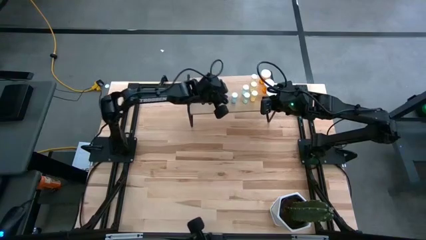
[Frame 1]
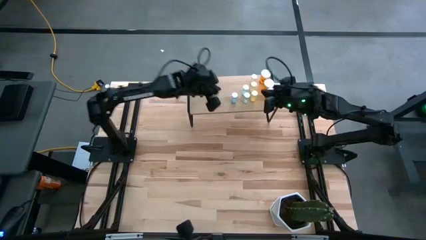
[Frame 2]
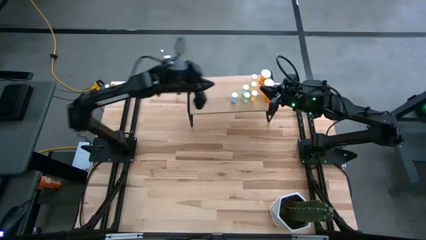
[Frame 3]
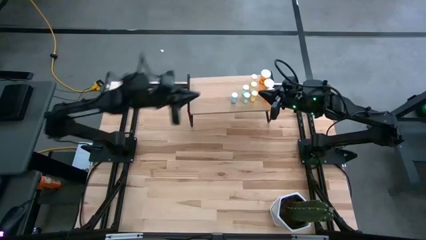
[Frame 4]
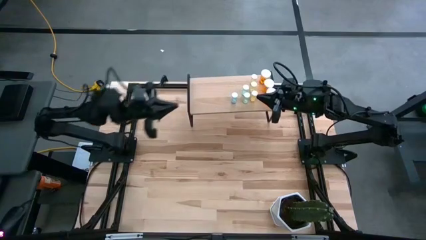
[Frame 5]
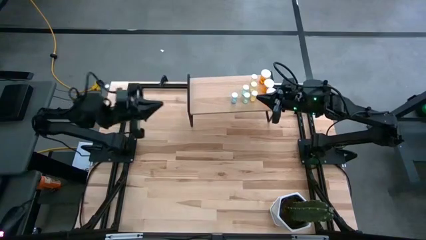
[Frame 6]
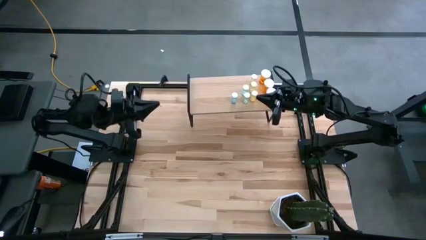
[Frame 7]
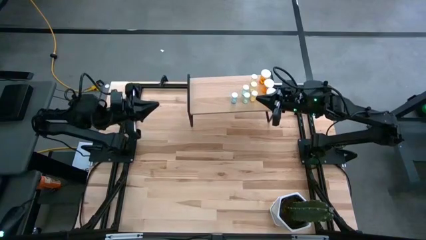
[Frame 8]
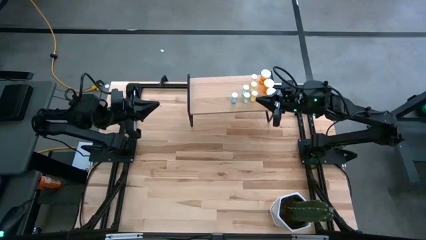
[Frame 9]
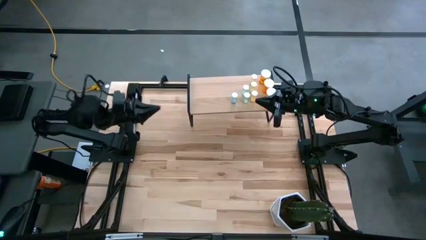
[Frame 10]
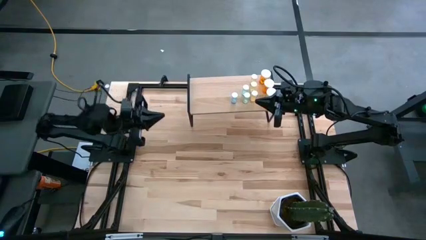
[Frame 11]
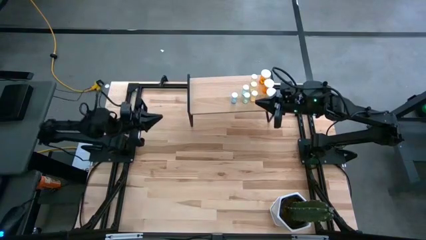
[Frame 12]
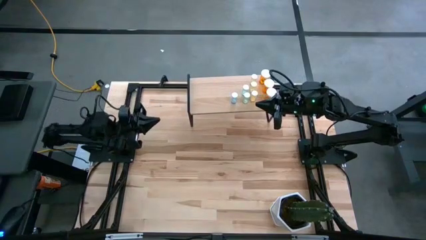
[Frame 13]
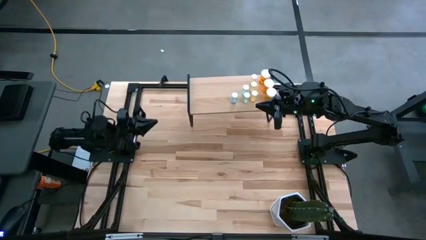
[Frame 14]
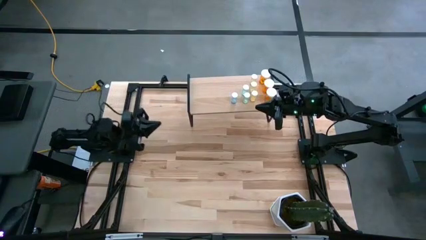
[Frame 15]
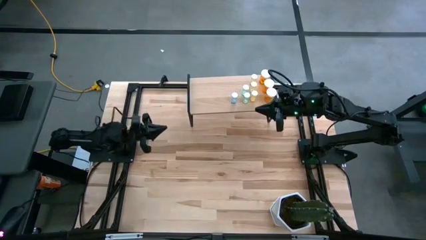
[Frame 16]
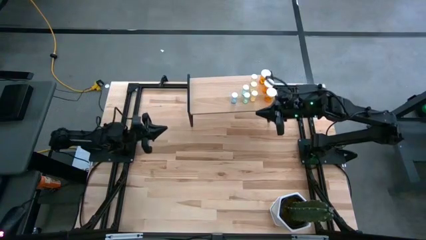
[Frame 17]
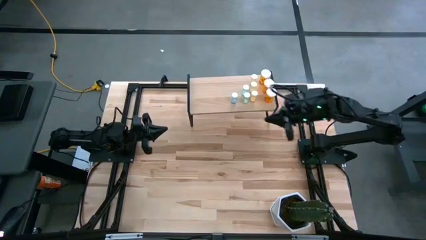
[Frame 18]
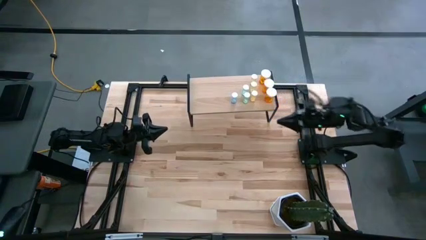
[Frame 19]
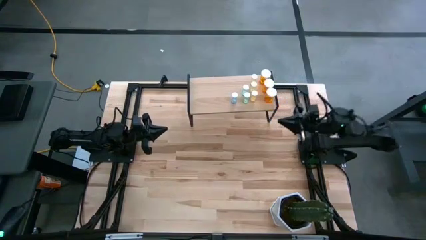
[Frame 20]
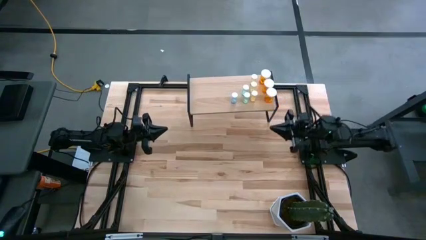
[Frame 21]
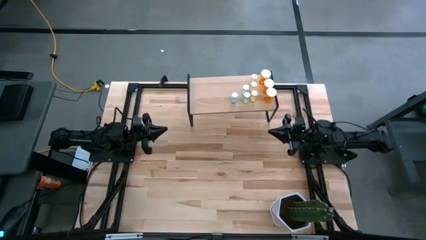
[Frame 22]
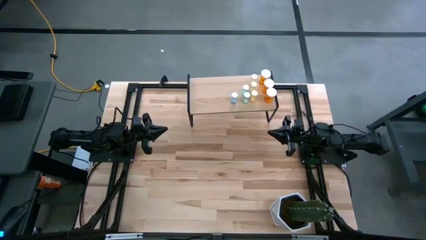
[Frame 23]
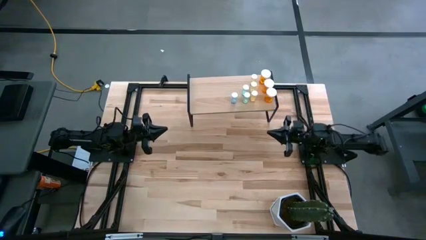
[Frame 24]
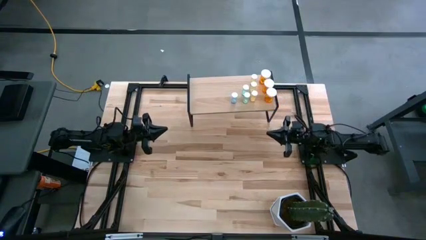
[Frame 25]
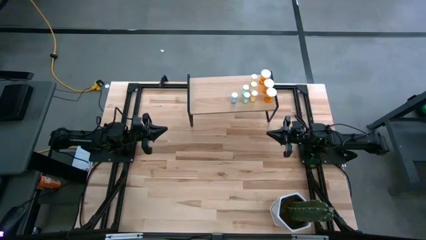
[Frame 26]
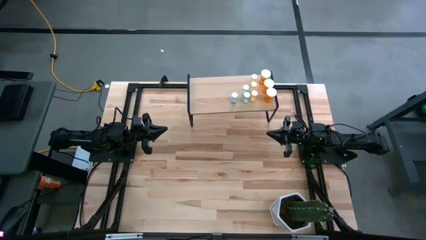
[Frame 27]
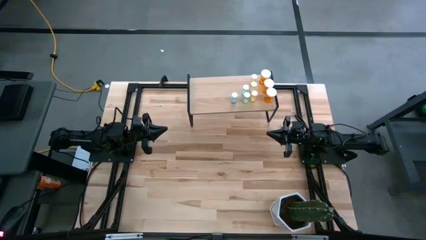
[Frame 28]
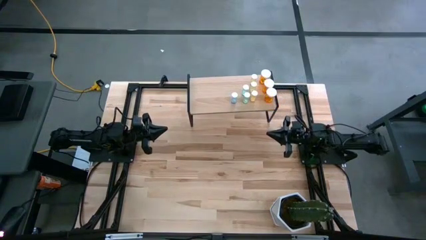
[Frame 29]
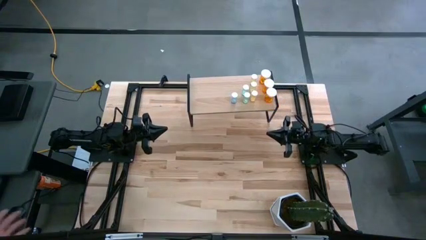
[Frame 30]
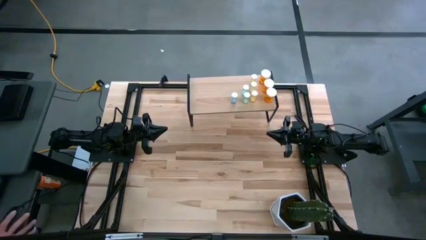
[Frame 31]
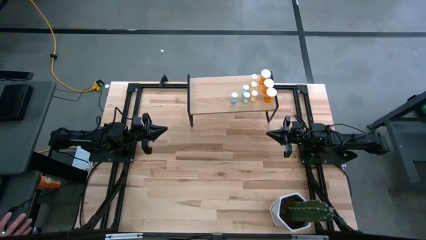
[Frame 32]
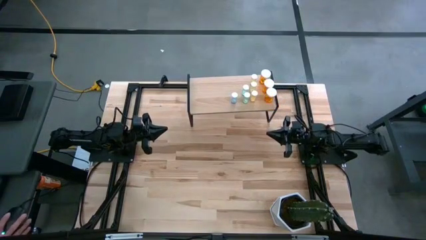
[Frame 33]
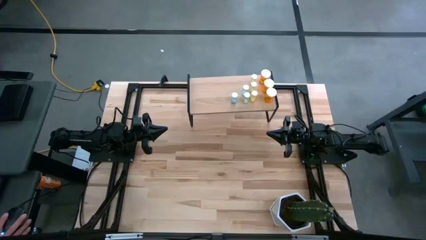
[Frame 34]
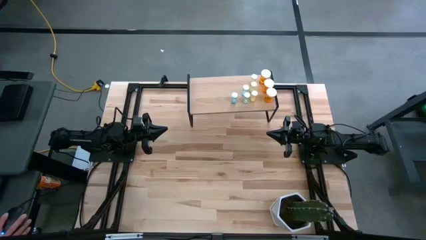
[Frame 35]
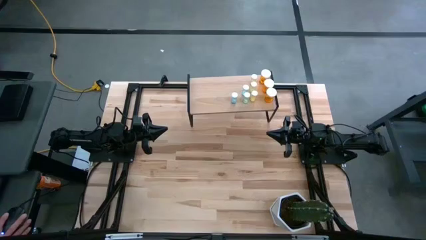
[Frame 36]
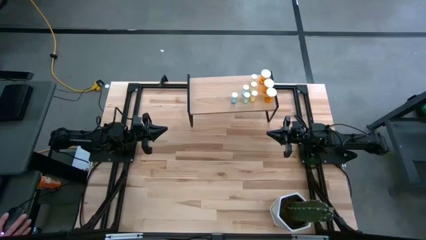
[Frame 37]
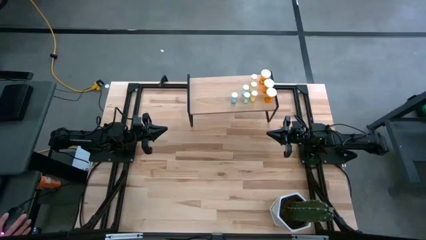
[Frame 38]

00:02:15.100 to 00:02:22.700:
Task: Pick and place medicine bottles onto shelf by color
Return to Home Position

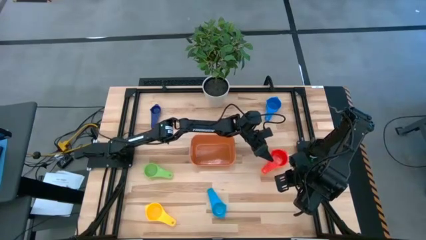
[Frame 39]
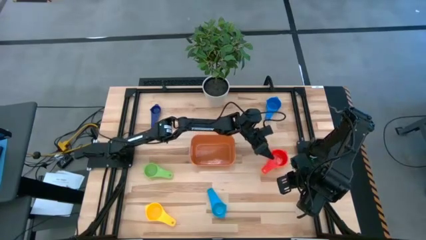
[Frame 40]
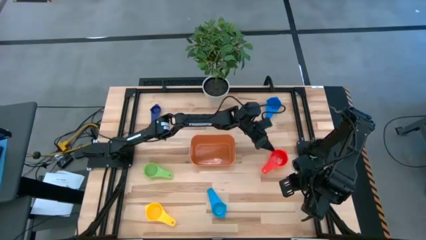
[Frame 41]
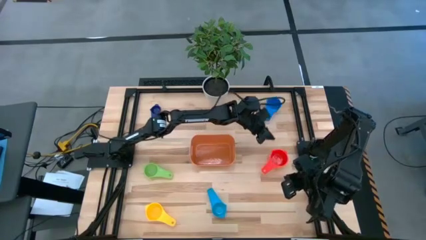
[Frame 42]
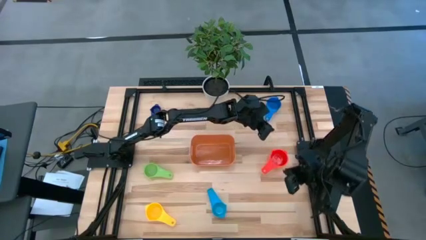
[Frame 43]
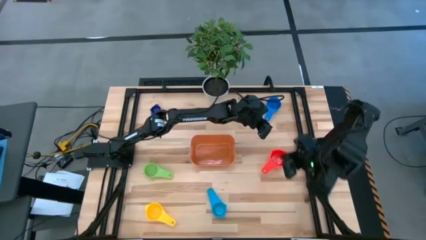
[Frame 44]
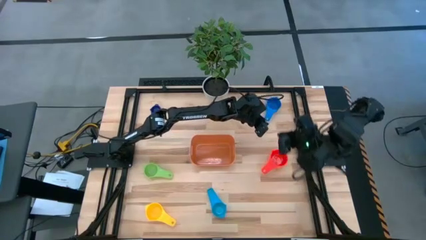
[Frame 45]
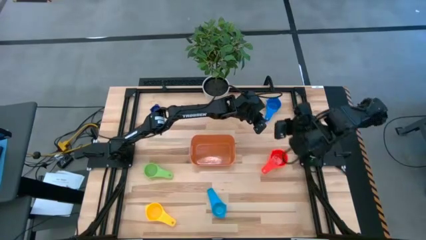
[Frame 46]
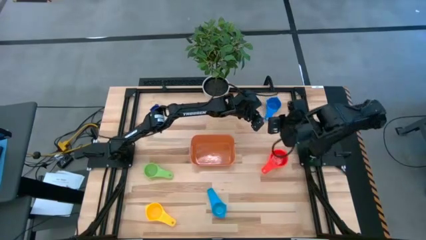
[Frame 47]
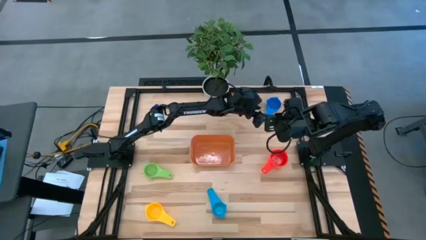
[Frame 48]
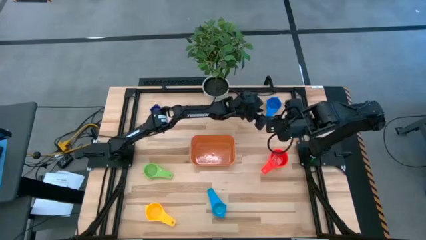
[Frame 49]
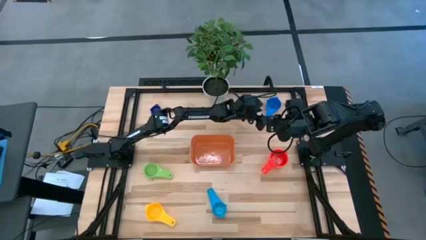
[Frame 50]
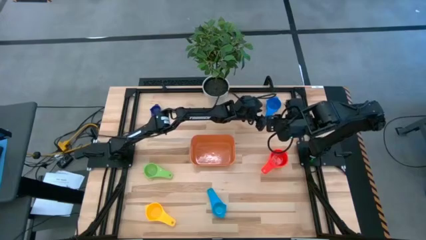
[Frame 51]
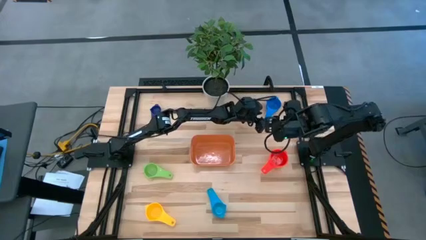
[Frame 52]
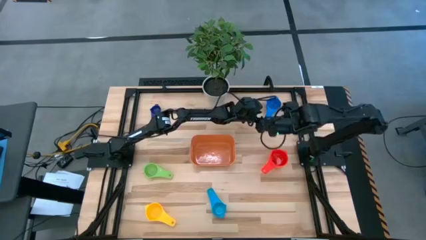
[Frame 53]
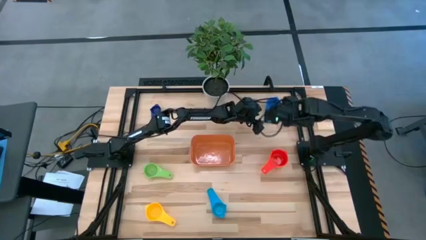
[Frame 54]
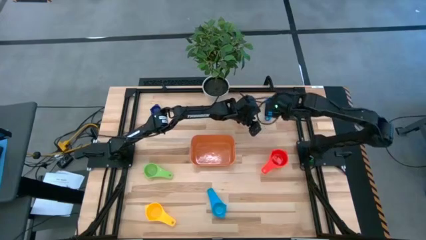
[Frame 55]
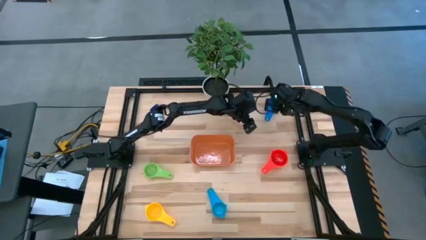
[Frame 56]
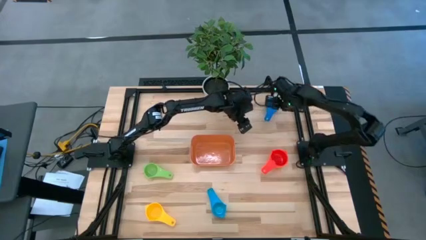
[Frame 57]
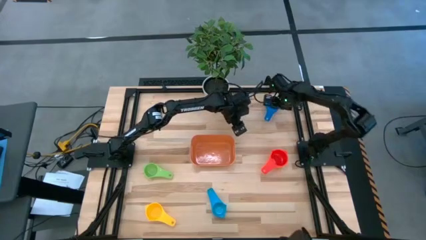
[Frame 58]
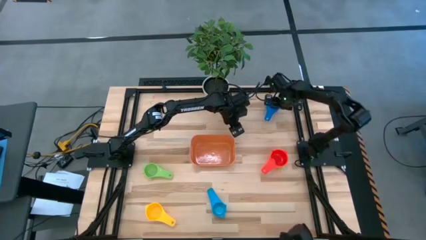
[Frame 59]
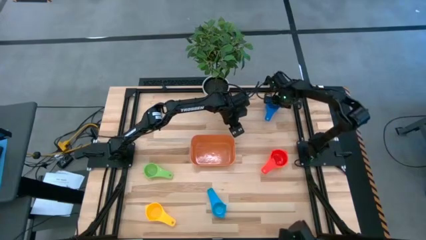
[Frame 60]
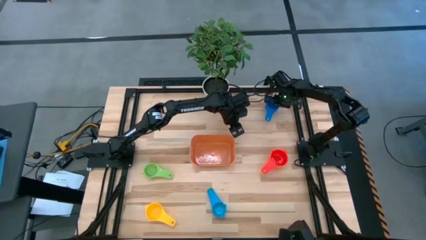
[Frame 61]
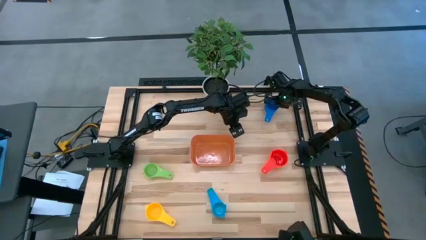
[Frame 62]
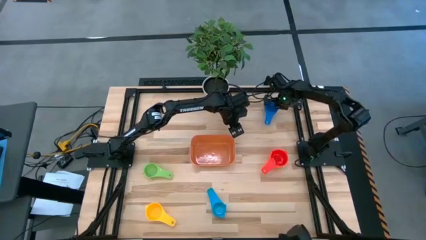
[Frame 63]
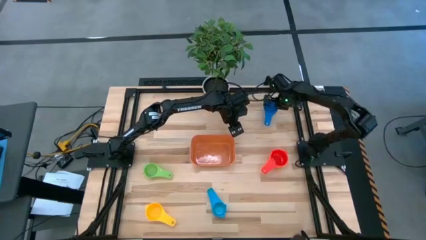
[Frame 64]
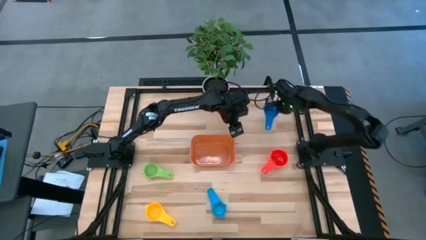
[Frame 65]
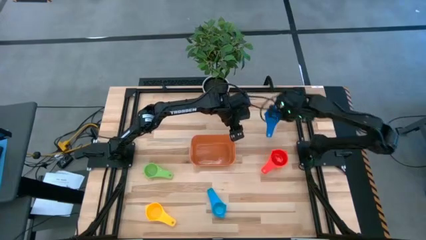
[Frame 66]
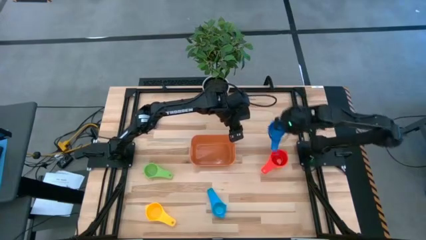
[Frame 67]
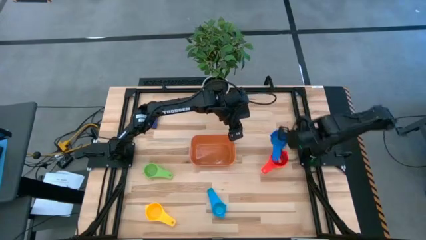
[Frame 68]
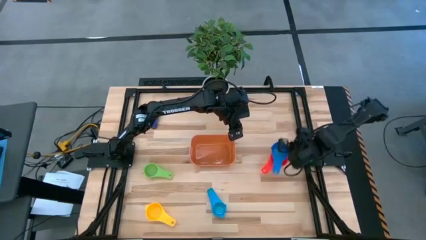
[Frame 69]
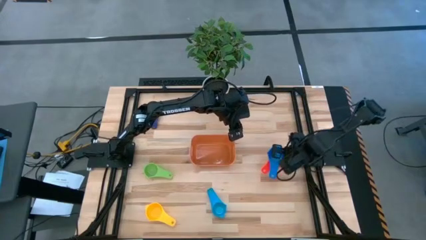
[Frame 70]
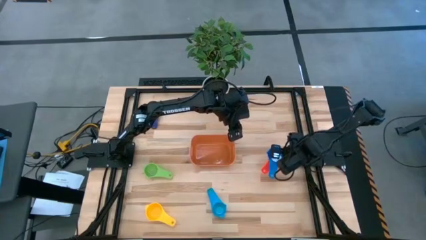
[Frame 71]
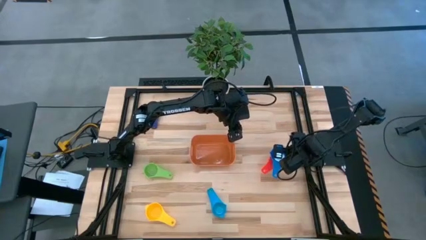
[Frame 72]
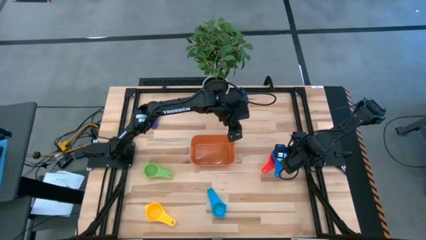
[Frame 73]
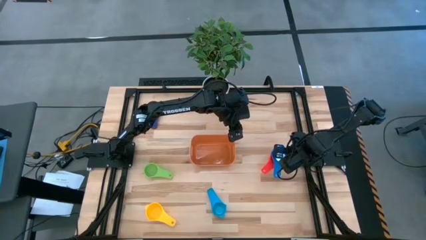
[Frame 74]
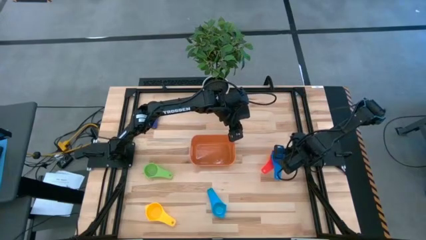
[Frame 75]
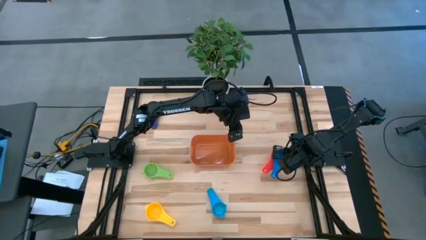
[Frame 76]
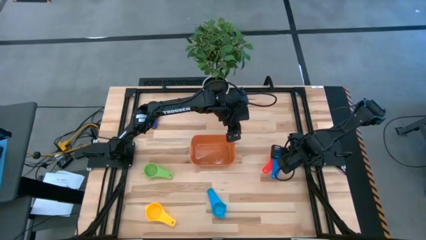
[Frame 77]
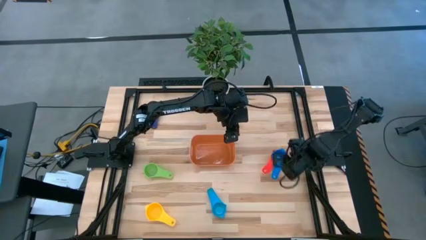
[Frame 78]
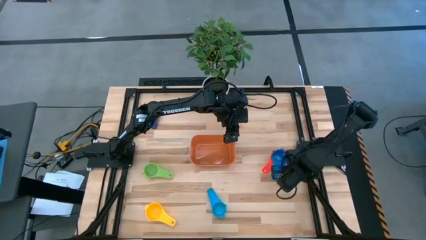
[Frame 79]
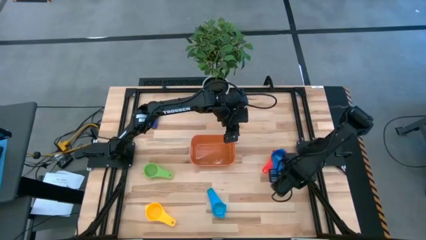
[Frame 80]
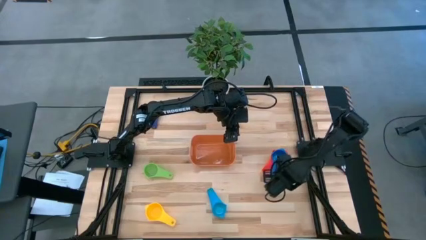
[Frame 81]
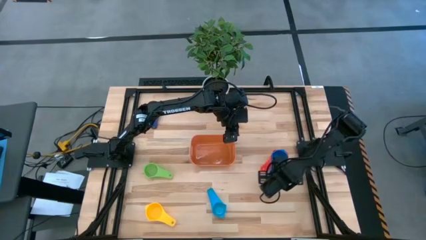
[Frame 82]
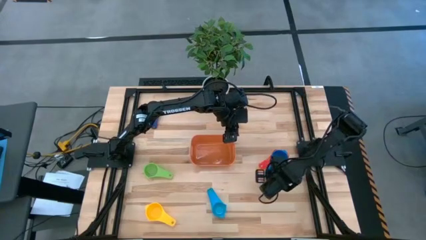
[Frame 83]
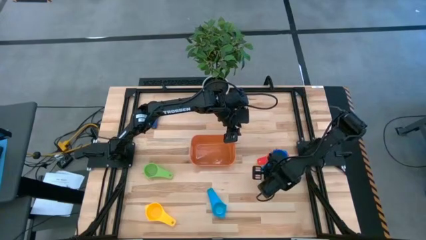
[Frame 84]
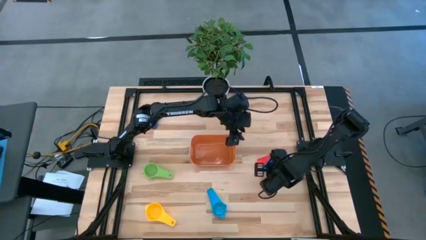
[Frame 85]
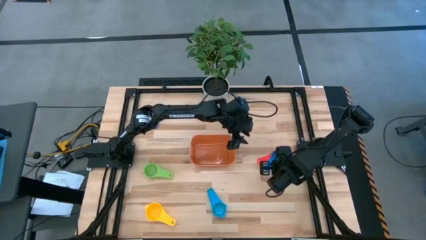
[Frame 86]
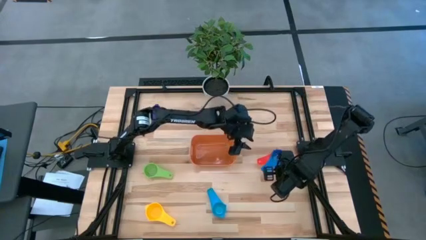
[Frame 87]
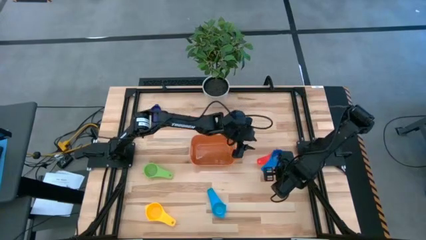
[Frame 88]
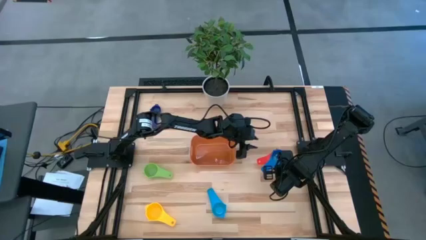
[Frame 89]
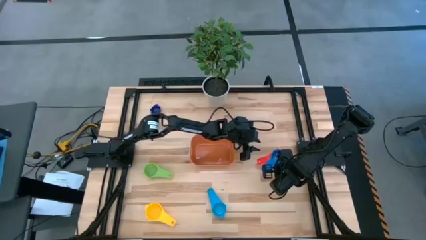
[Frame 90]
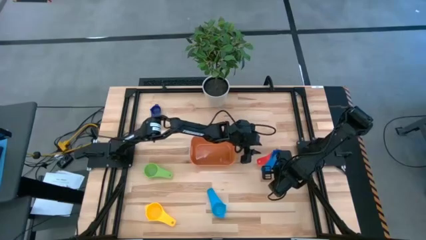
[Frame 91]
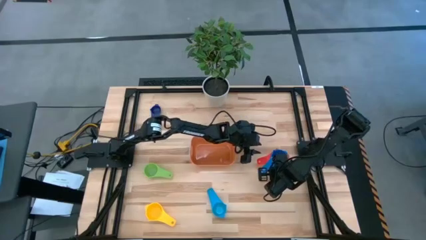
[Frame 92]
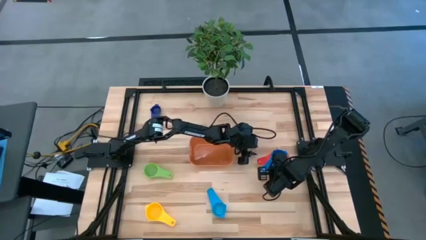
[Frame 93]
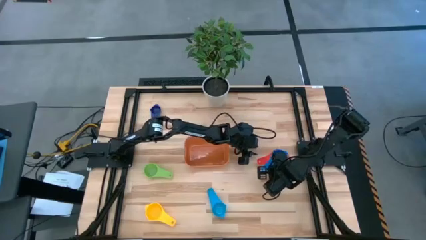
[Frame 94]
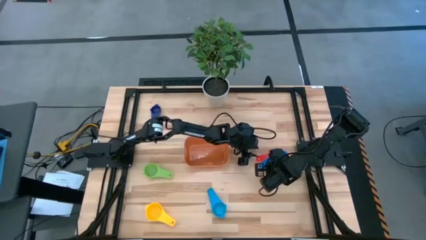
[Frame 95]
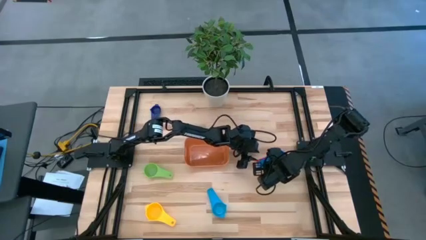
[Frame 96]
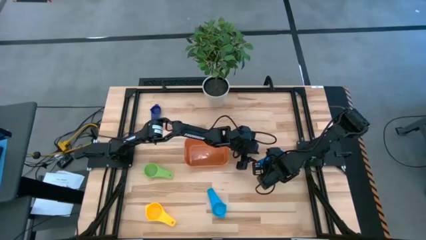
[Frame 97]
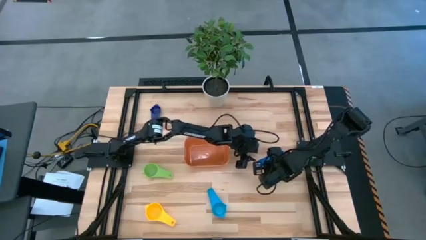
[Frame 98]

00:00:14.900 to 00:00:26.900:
Task: Nest measuring cups in basket
Stack the blue measuring cup on top of the red measuring cup
